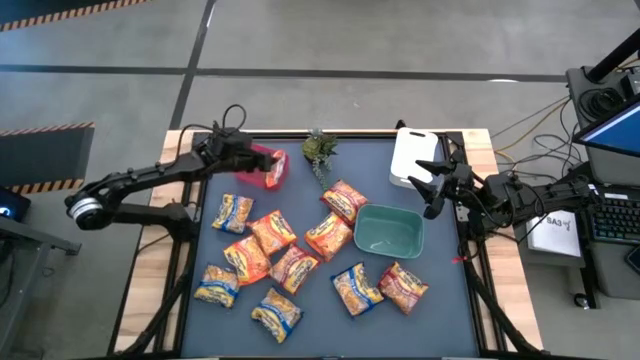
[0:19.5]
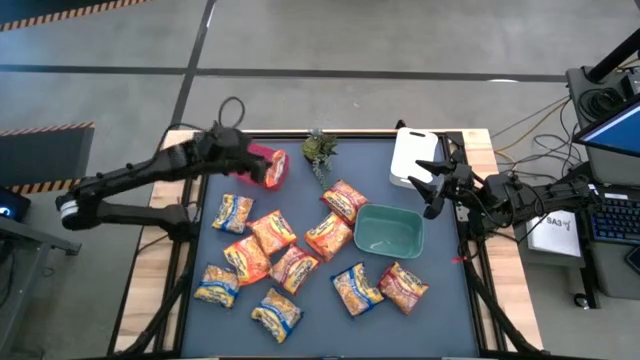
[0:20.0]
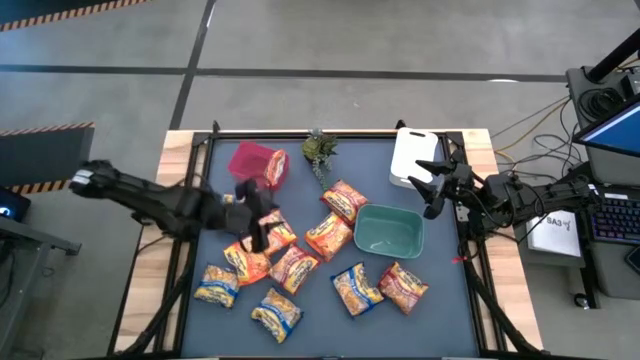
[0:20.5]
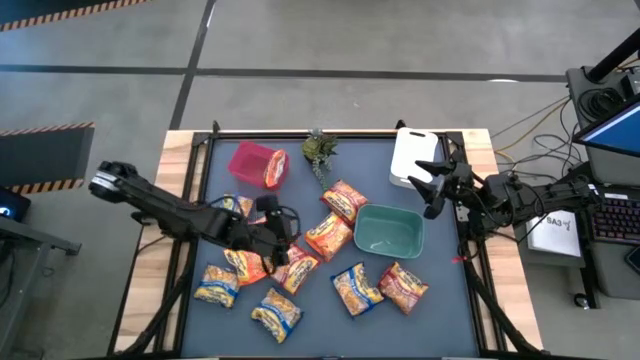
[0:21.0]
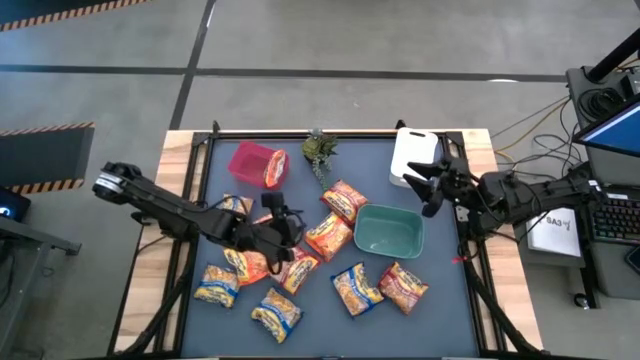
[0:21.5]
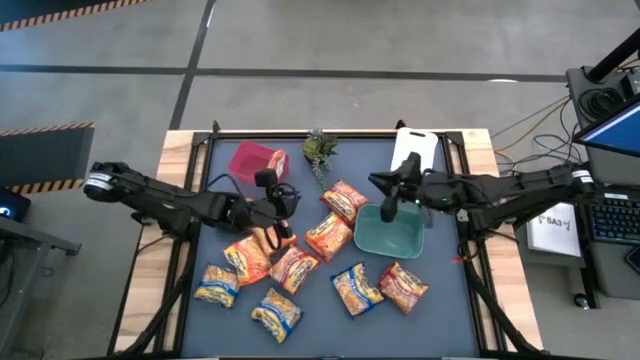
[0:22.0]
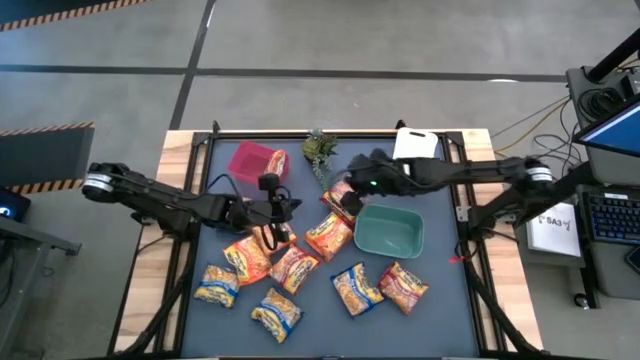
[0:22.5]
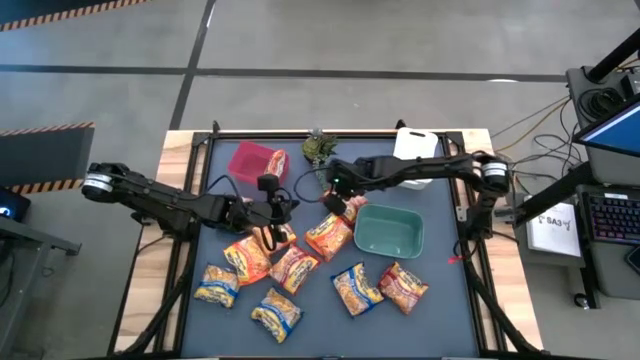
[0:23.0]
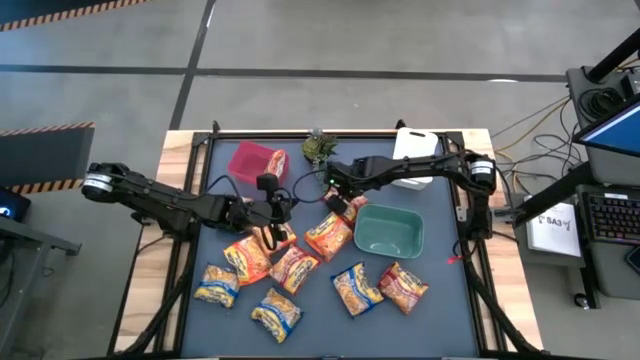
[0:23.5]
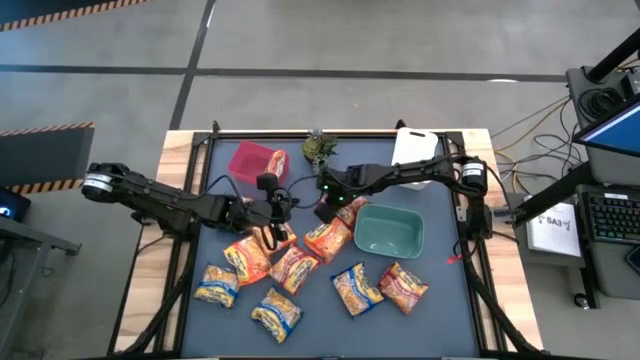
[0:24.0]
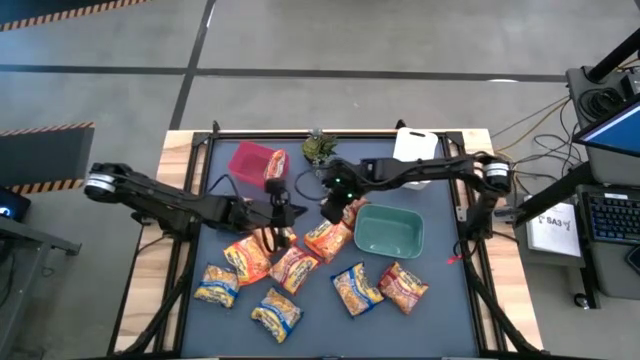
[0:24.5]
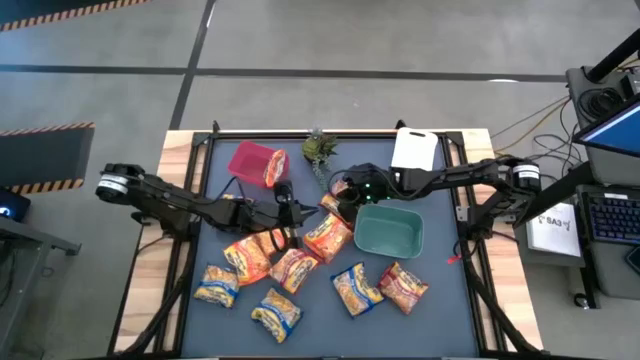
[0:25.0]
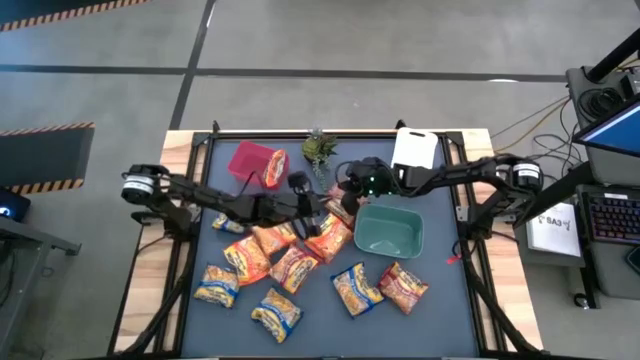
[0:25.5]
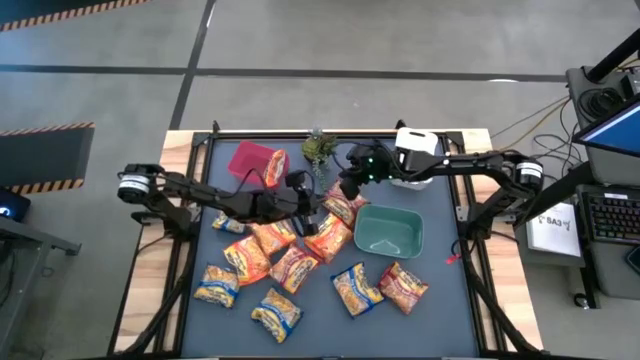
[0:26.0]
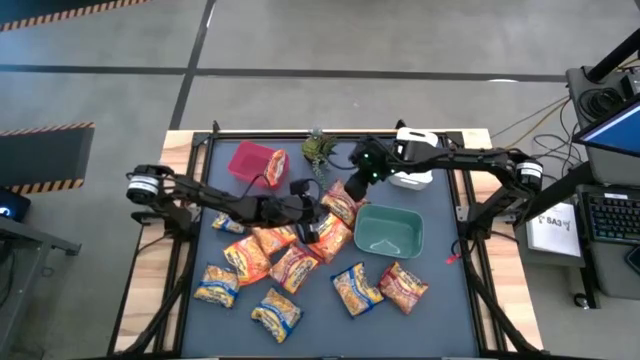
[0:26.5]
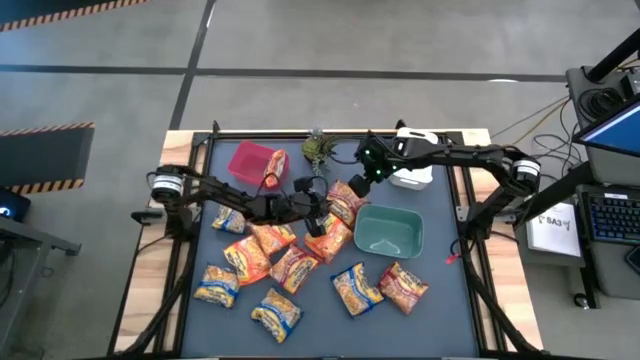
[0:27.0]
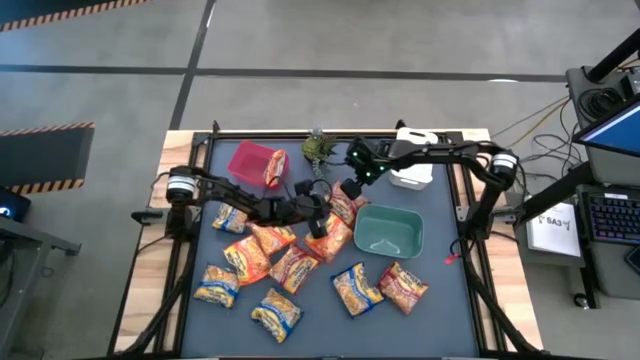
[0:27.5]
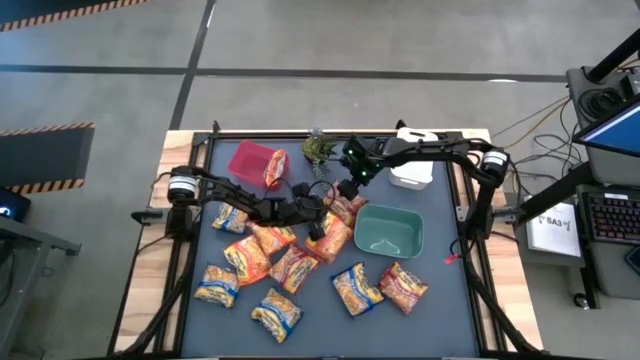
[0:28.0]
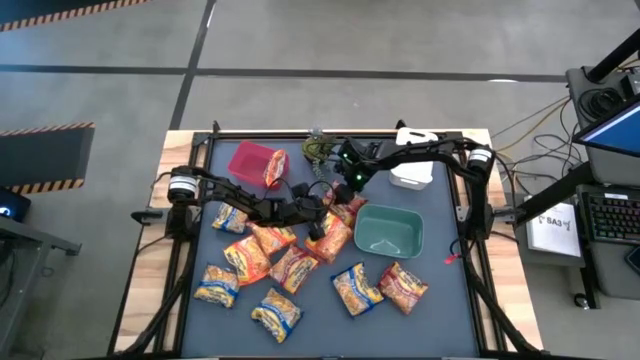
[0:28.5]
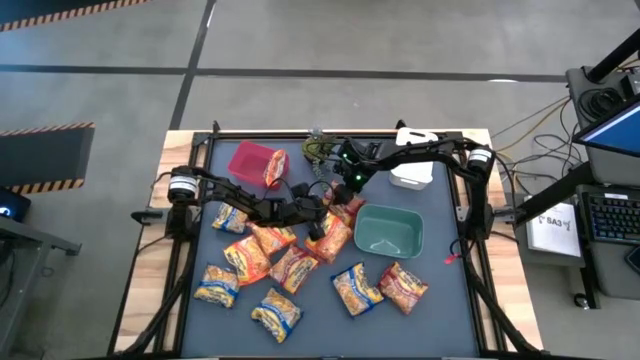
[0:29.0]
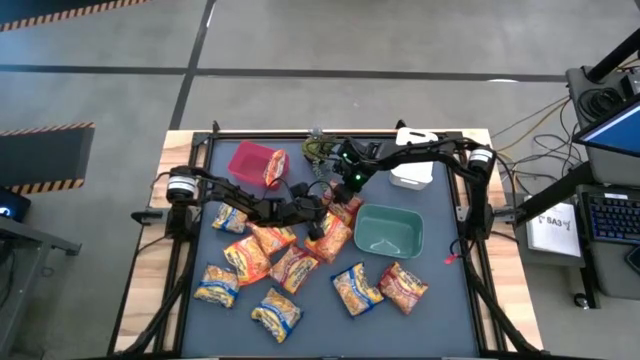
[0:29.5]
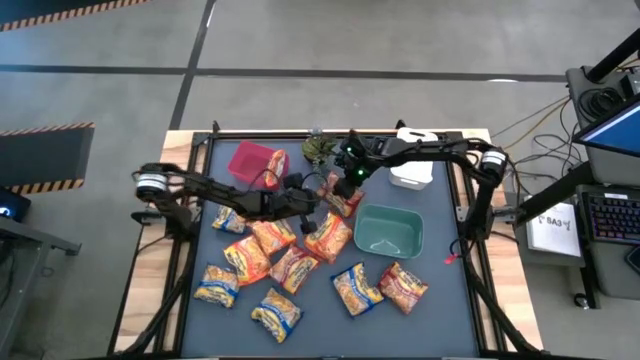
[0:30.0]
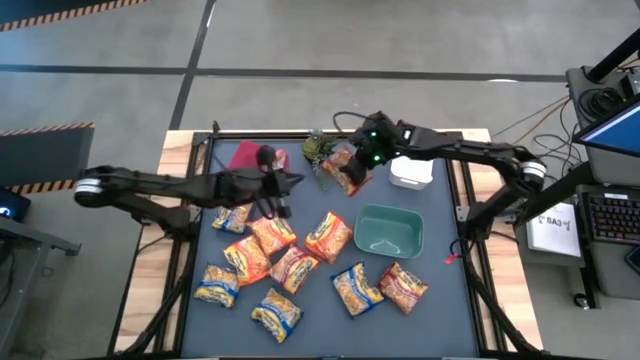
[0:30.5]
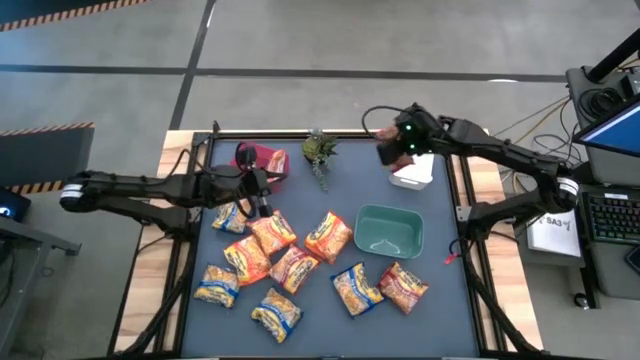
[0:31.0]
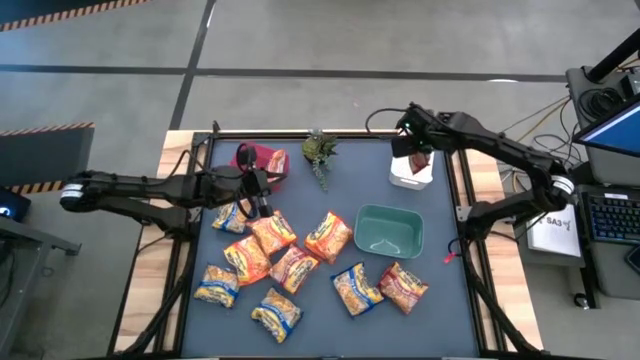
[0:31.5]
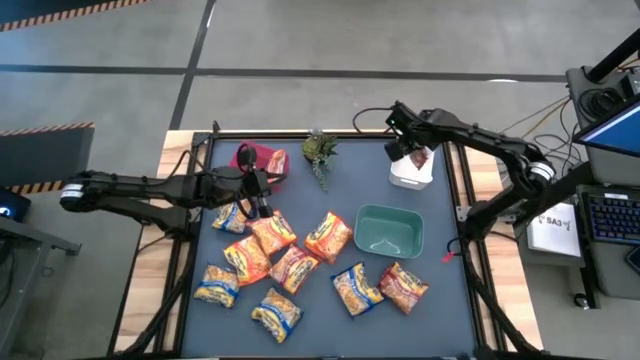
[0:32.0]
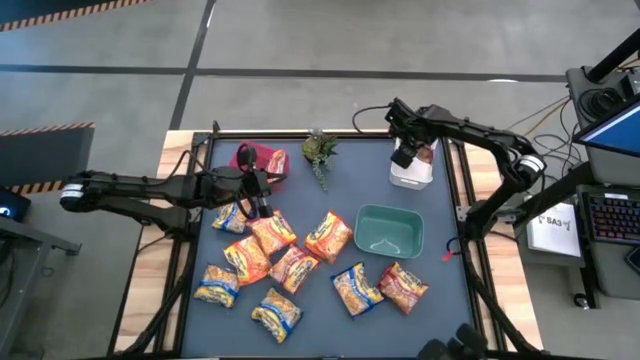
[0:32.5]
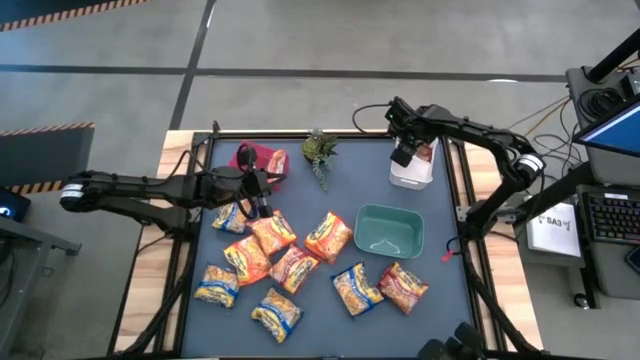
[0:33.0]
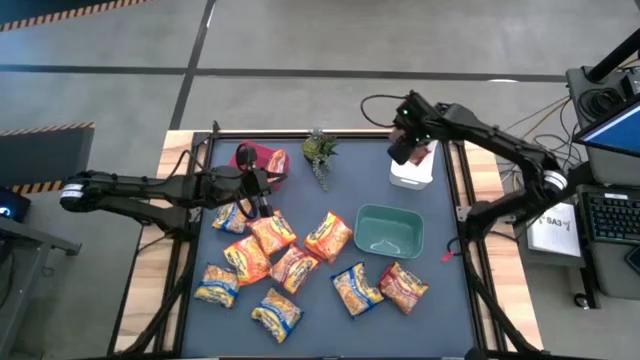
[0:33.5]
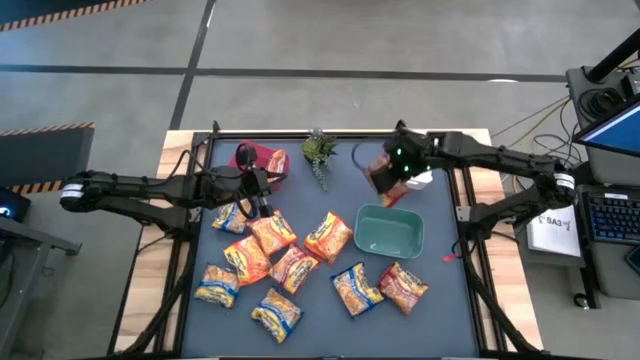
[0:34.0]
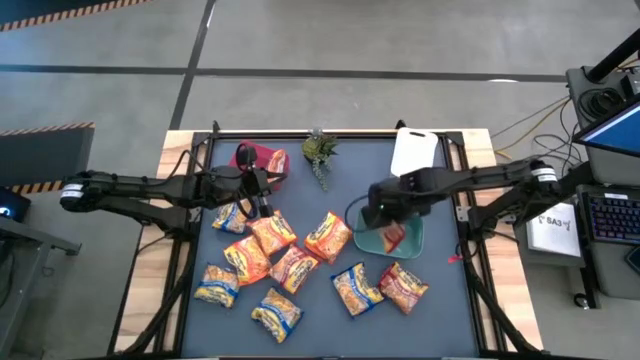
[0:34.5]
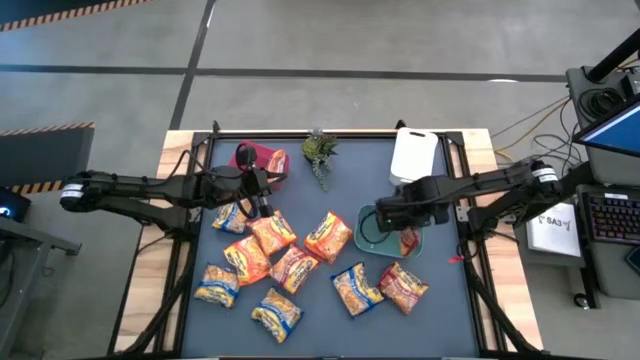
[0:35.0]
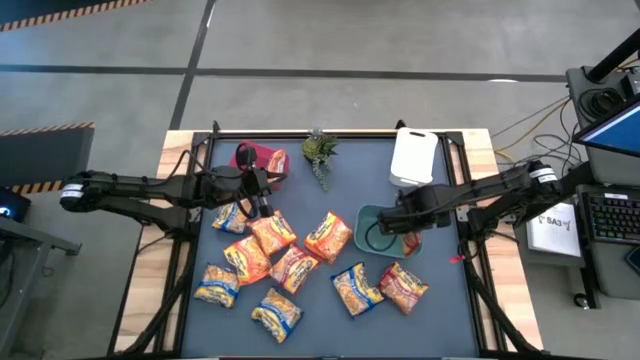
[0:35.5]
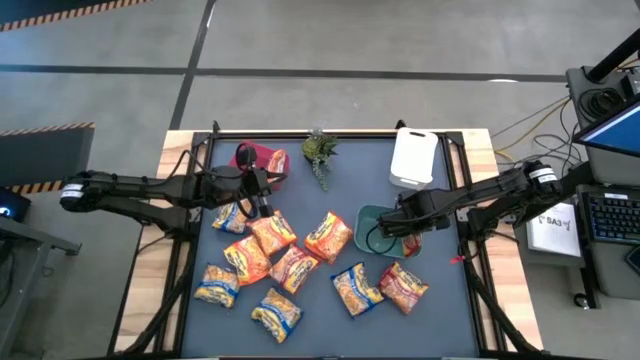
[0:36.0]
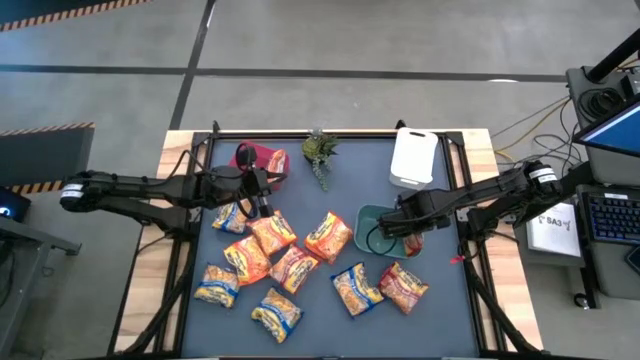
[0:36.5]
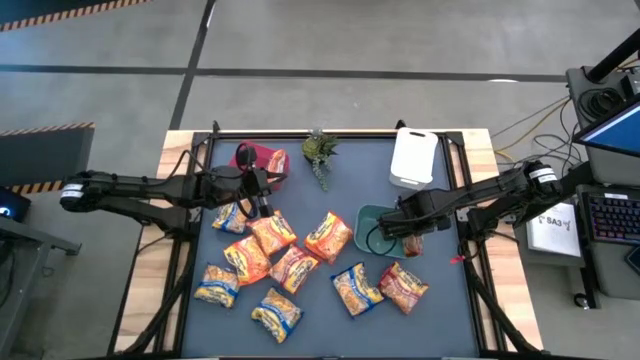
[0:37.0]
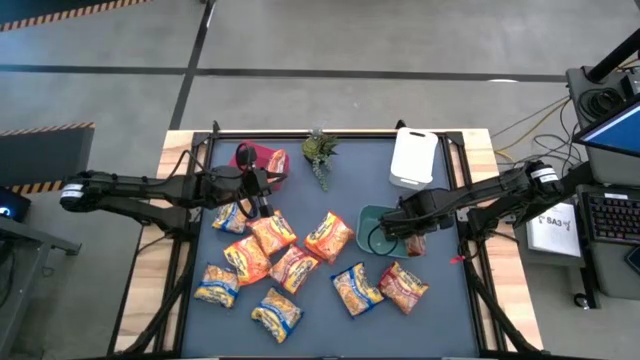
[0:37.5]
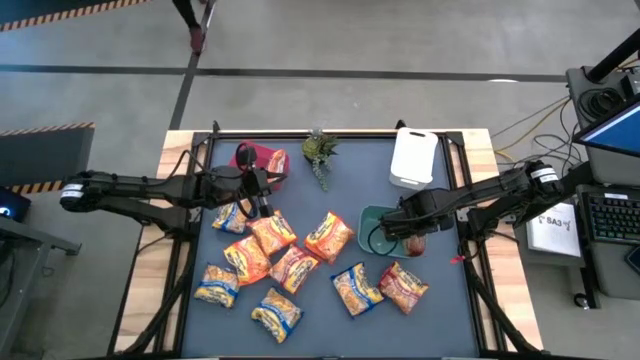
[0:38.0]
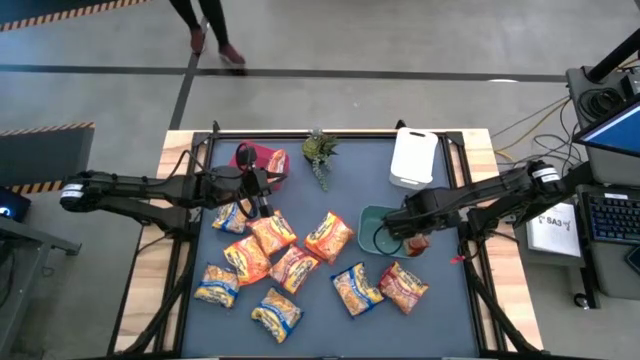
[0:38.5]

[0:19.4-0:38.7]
Task: Sort Maruchan noodles
Put the red noodle pack into the green bin

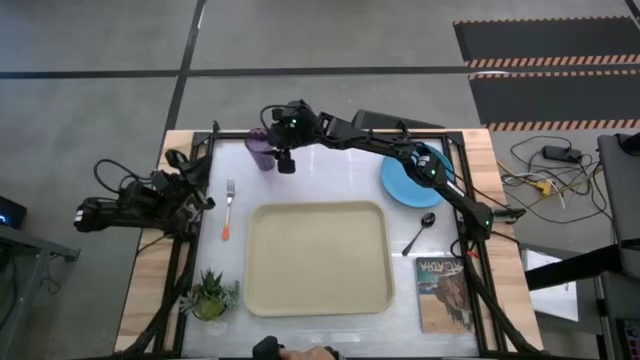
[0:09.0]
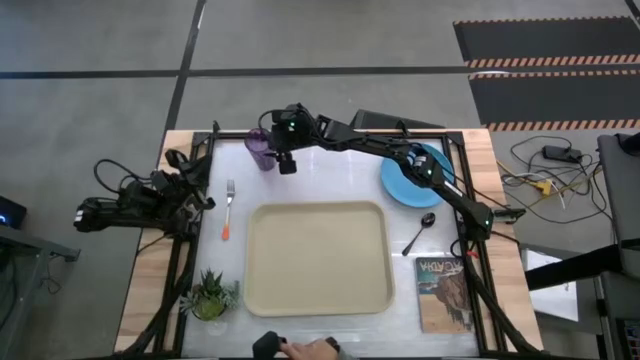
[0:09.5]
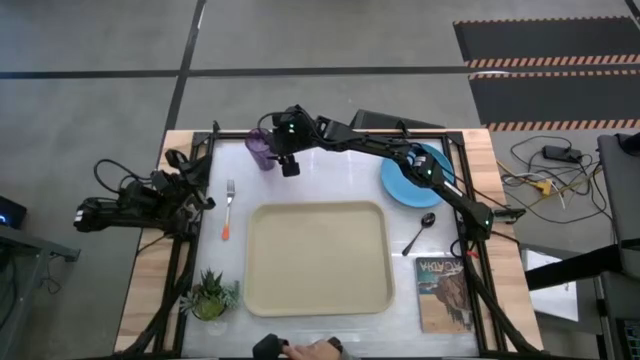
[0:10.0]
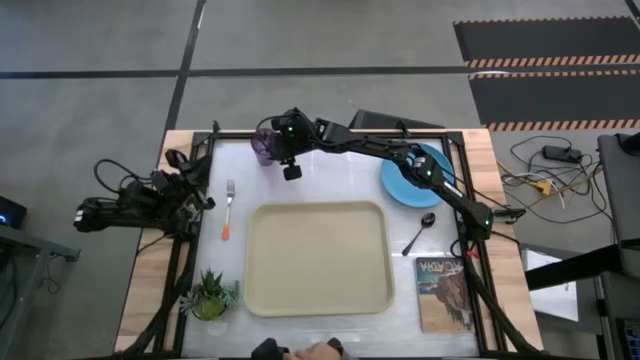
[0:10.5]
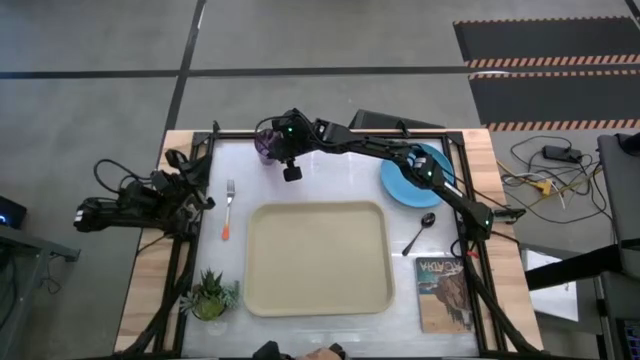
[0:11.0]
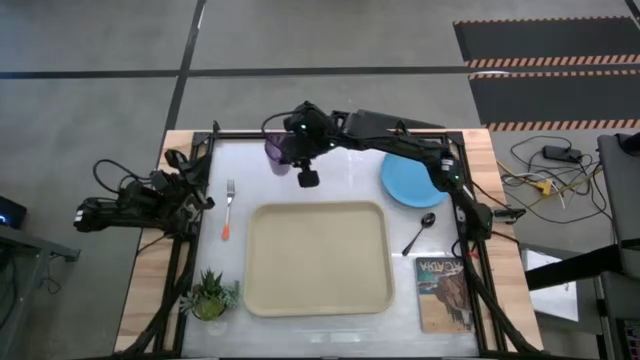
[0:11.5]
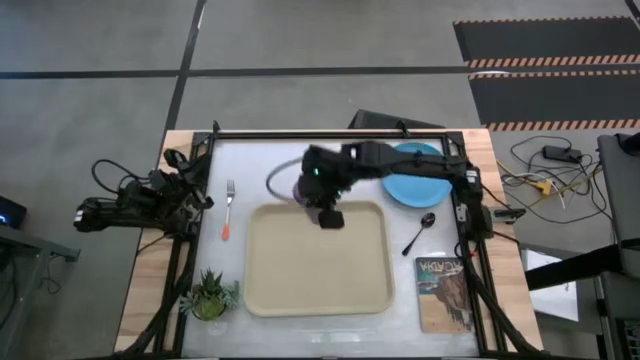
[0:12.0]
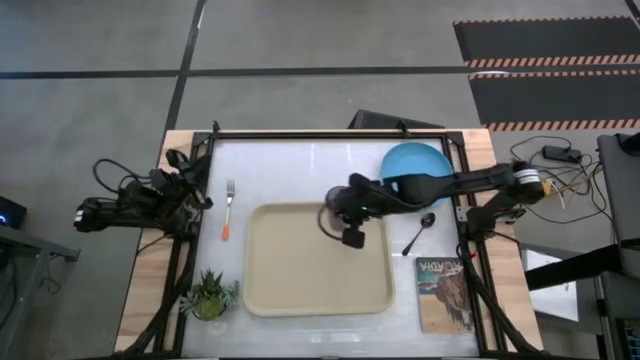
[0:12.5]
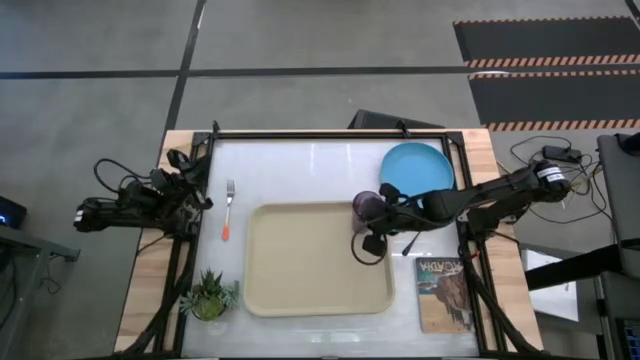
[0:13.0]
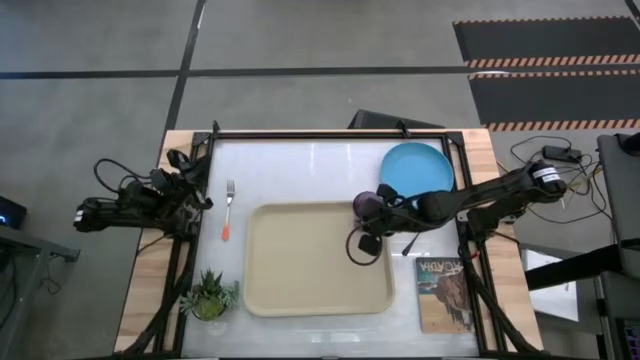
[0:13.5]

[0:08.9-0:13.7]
Task: Pick and place plate/cup/fork/spoon on tray
Put the violet cup on the top right of the white tray
